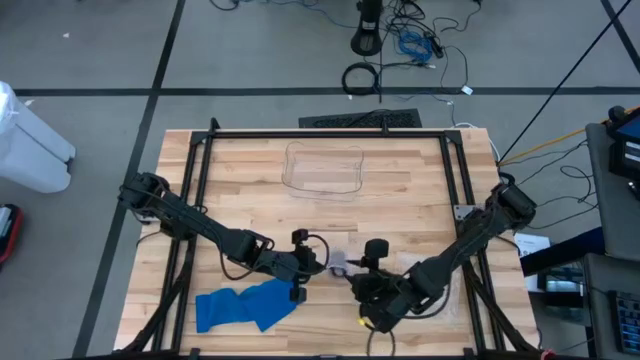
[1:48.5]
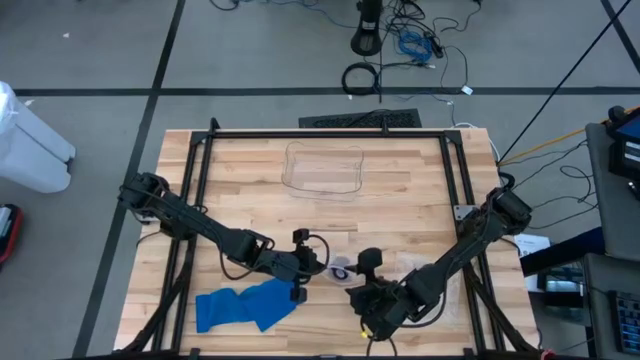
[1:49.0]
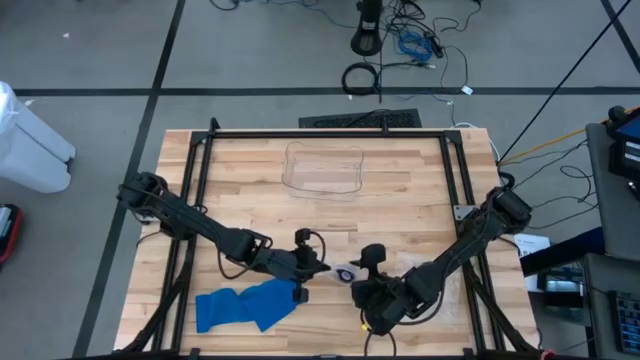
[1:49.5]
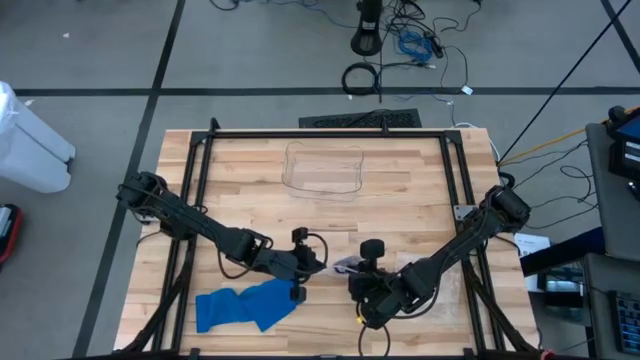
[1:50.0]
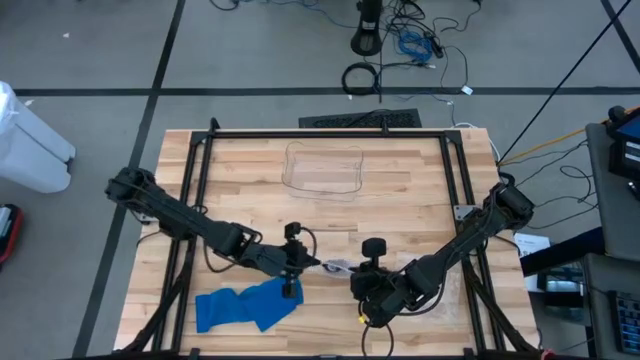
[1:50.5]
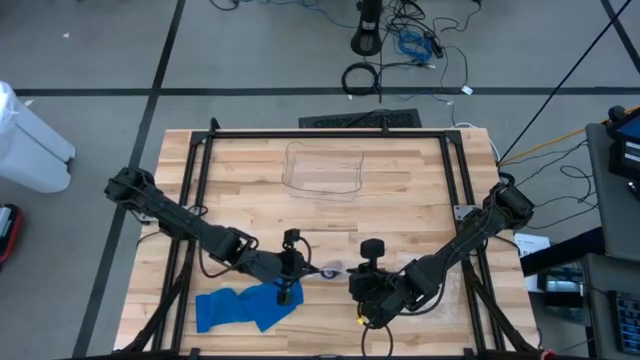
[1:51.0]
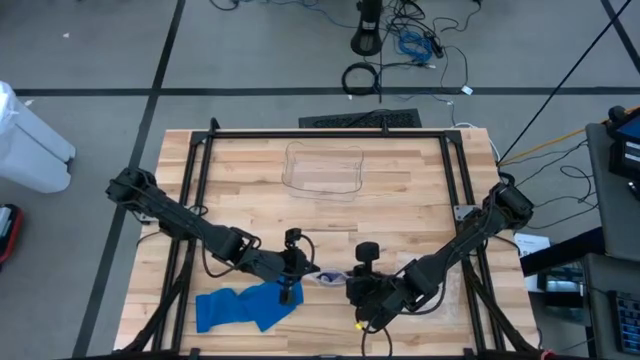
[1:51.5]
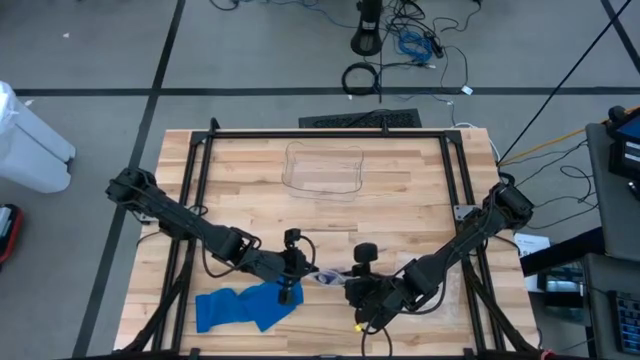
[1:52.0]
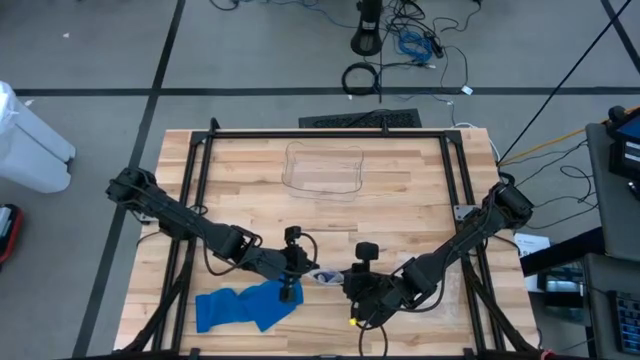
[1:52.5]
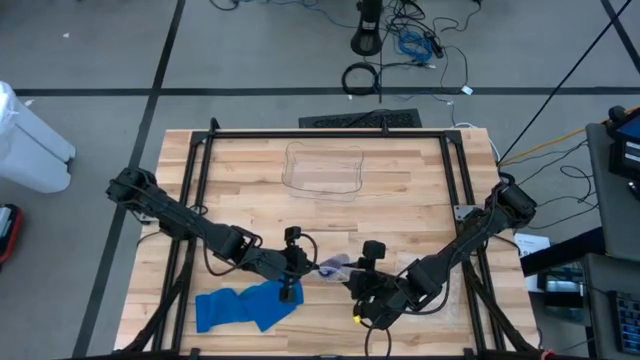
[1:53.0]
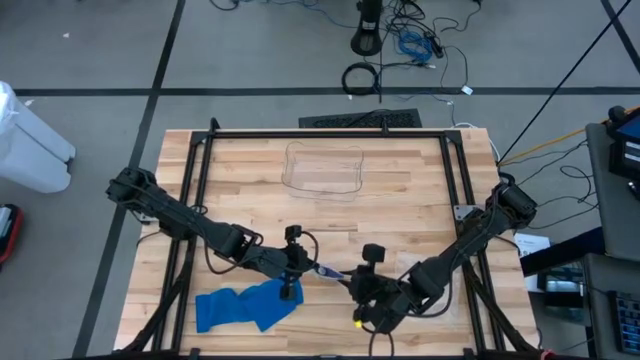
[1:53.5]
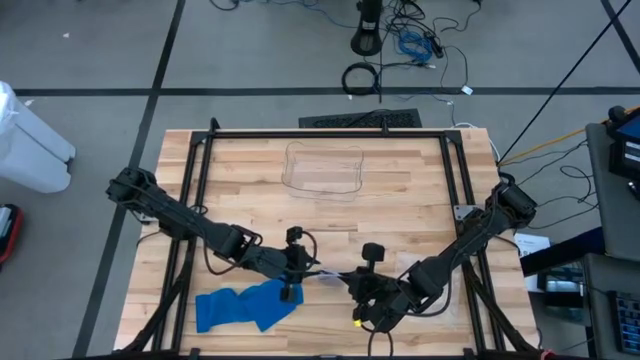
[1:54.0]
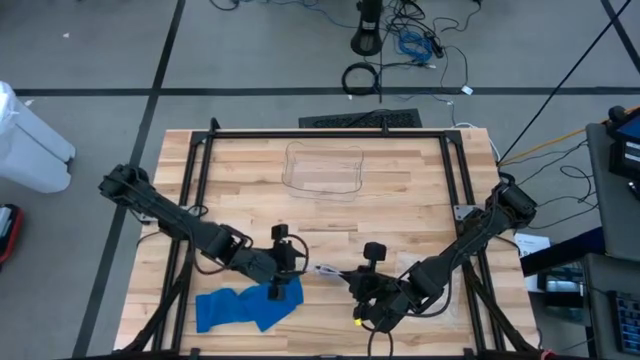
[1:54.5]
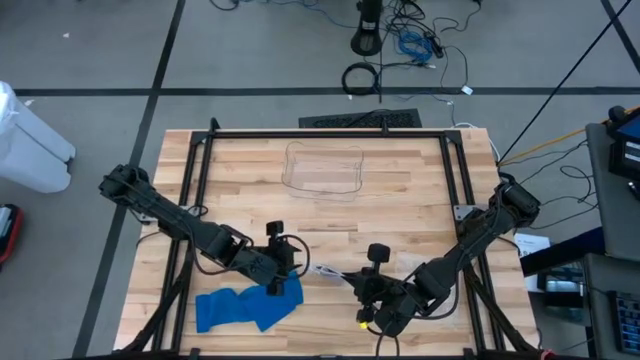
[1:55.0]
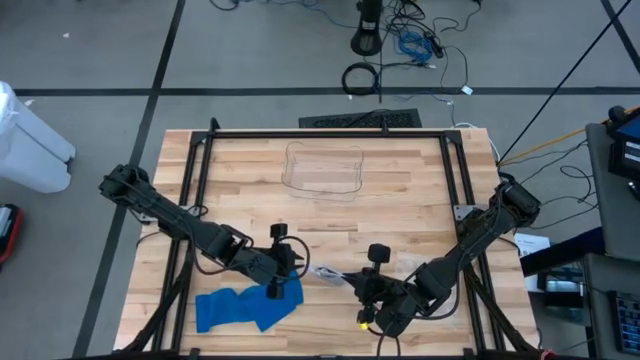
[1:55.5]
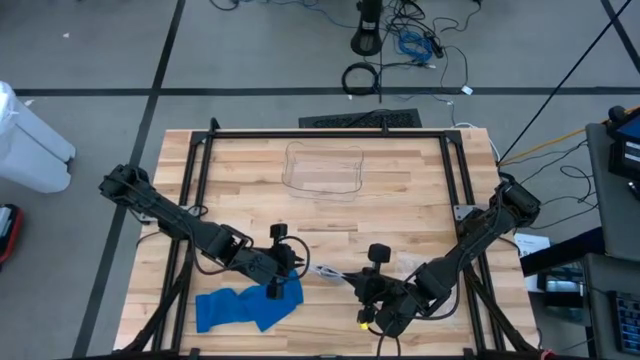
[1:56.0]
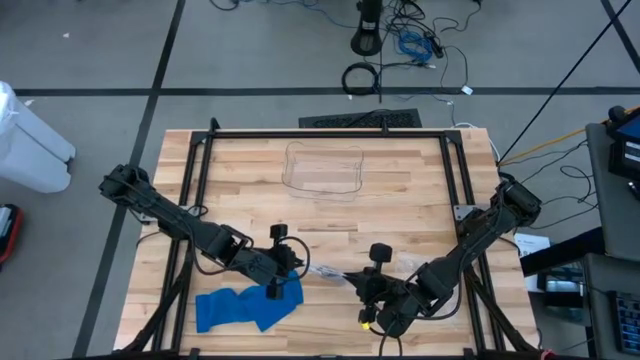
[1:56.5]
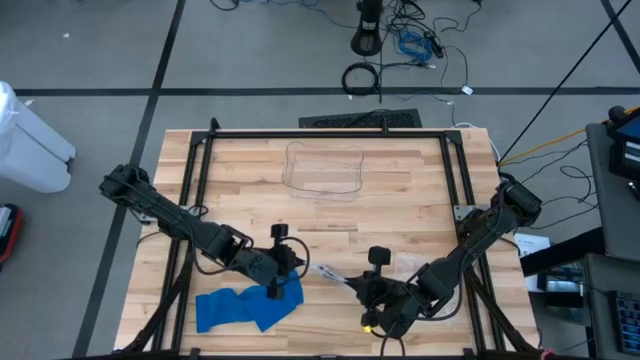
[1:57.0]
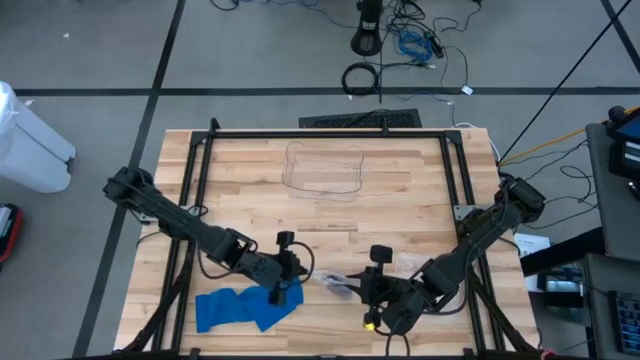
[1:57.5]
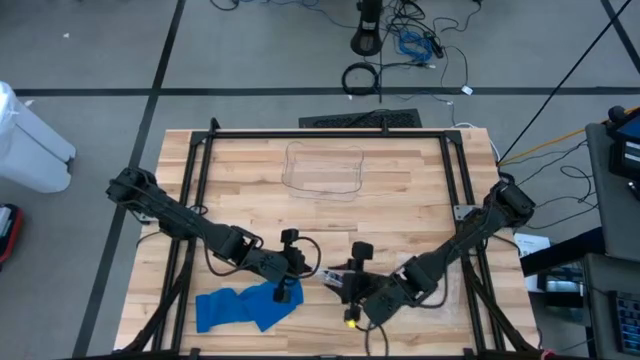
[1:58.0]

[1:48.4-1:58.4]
Task: Roll bandage
Close the transparent zip bag

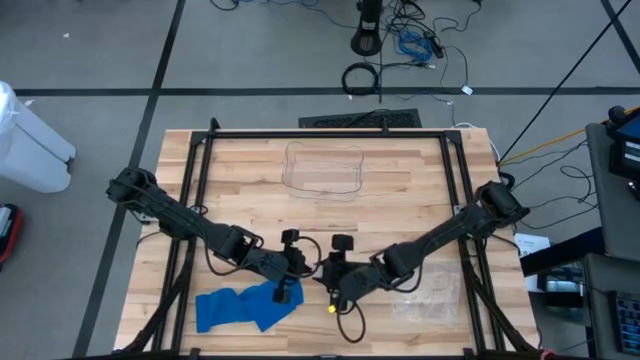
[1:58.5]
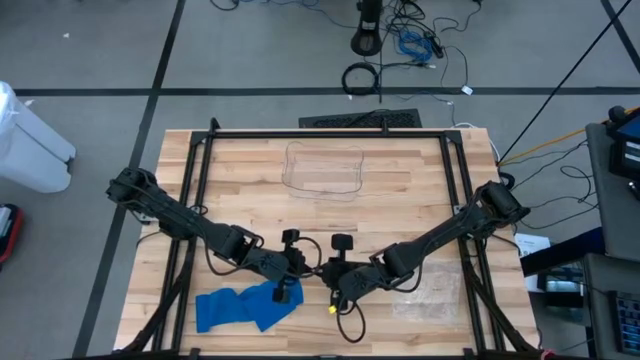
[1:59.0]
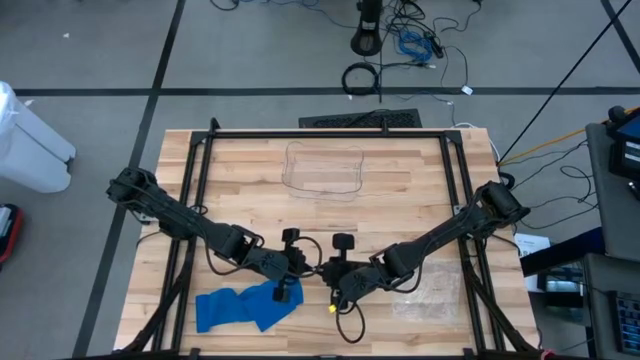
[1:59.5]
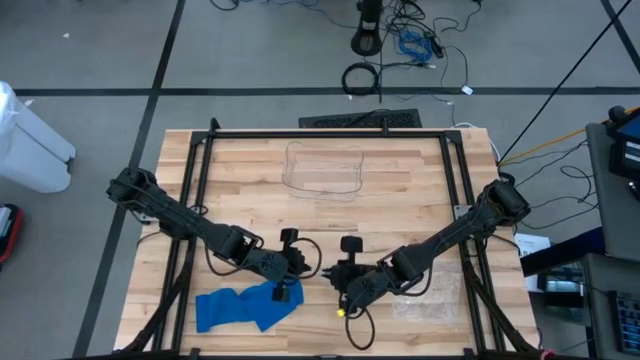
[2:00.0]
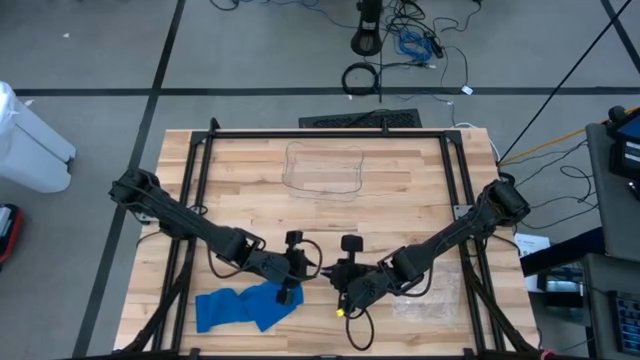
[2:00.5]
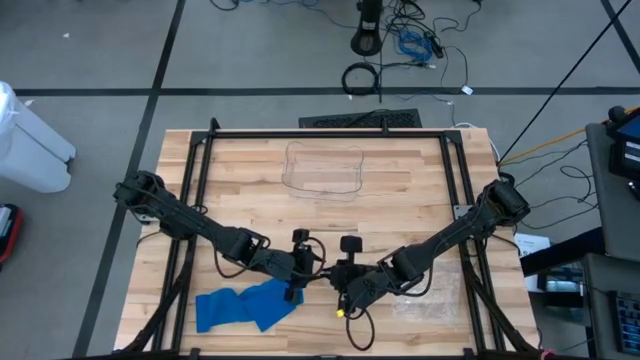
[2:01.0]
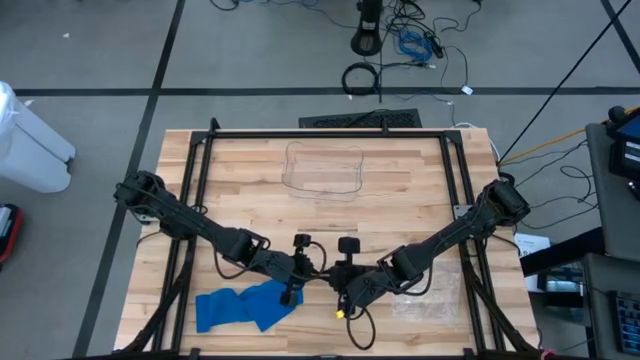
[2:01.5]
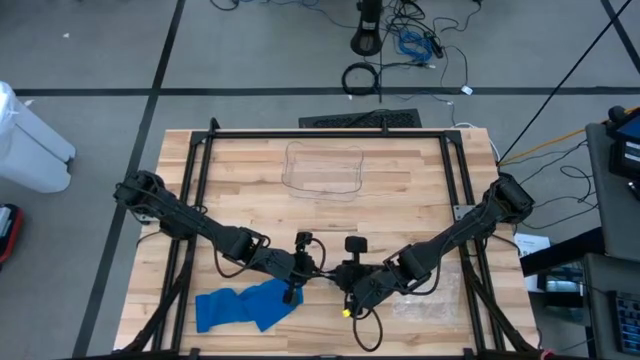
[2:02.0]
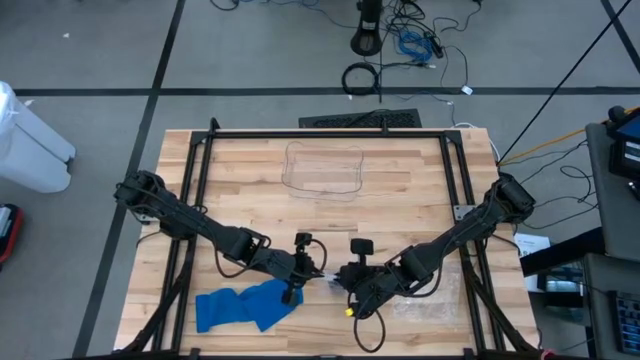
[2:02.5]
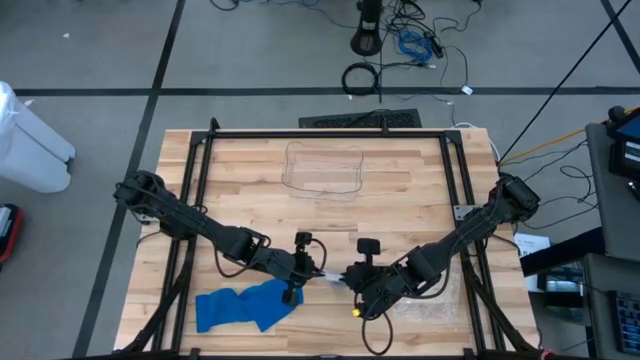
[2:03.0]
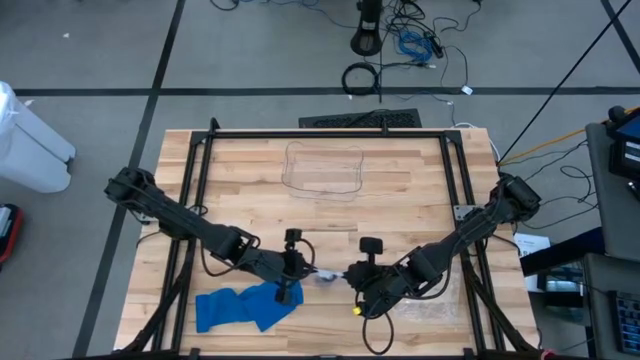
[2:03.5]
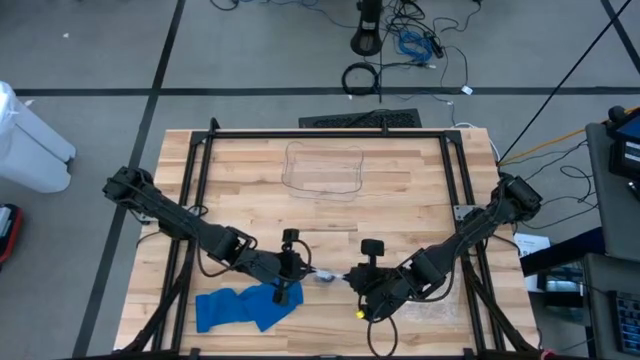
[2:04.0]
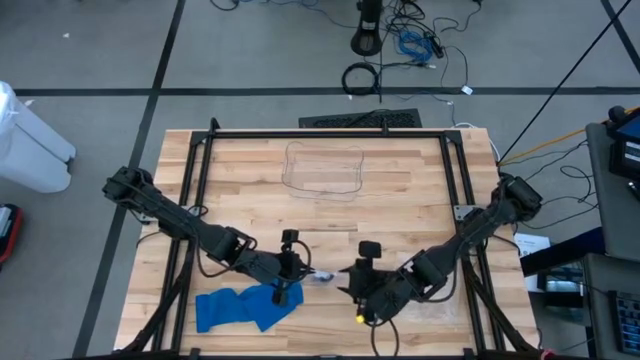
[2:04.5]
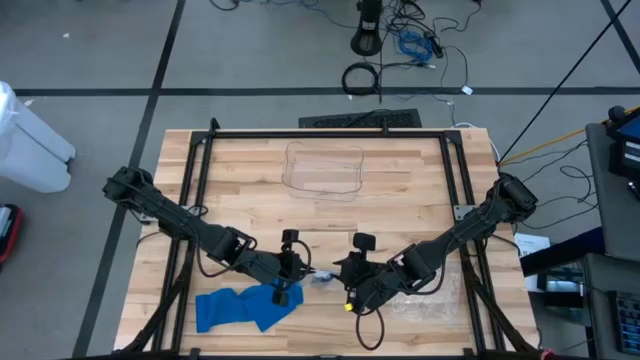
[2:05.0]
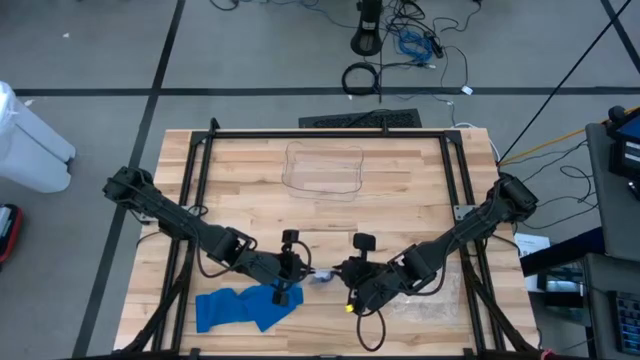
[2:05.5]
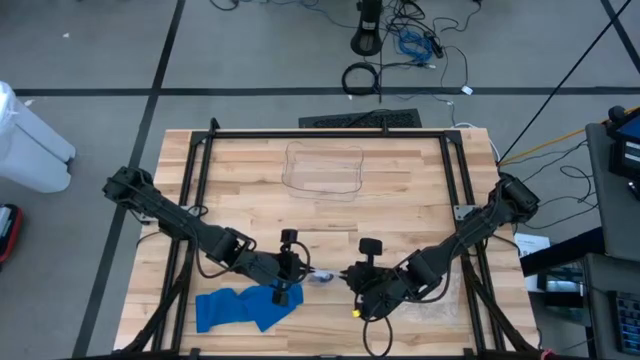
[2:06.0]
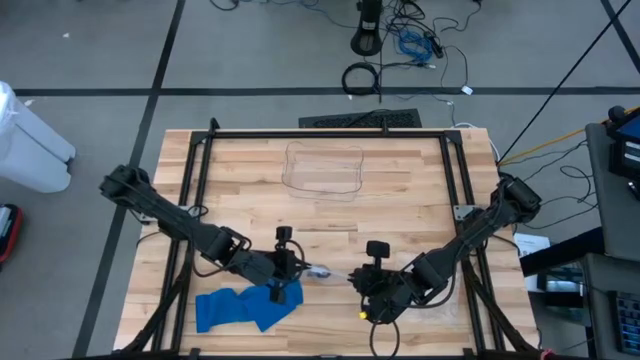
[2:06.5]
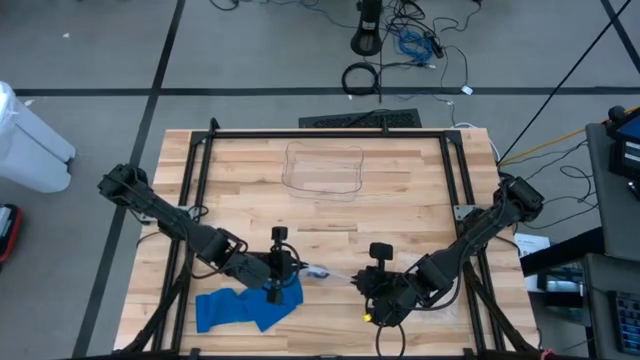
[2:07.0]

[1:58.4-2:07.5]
Close the transparent zip bag
